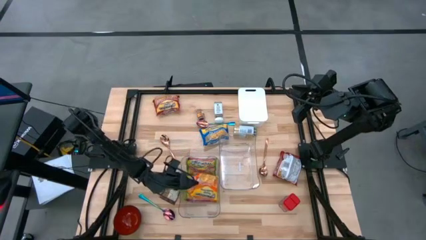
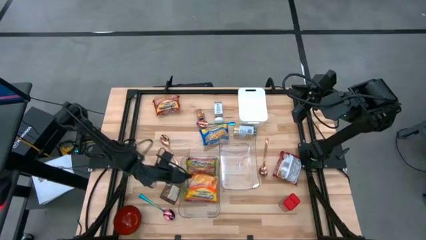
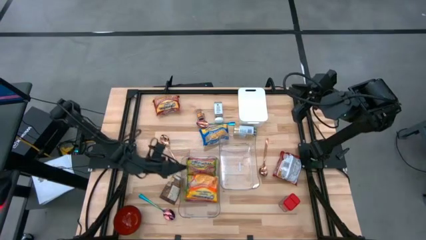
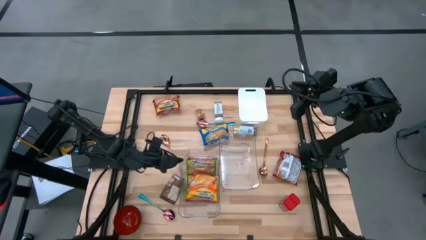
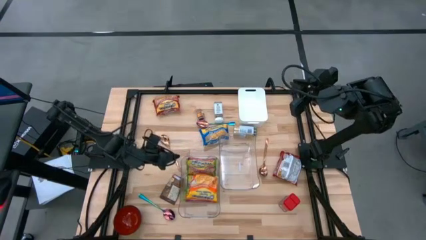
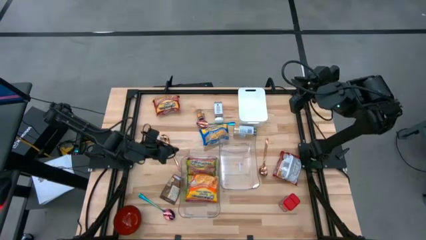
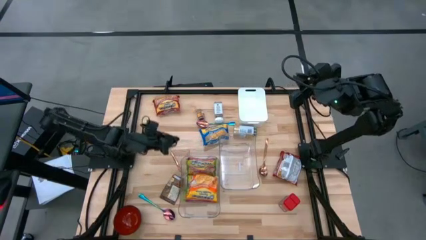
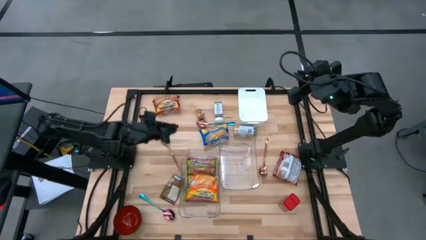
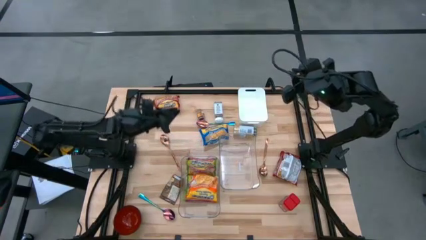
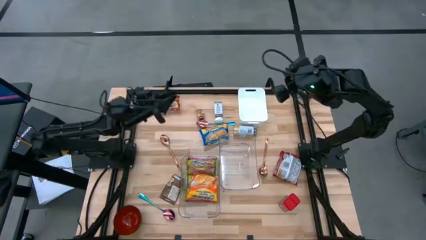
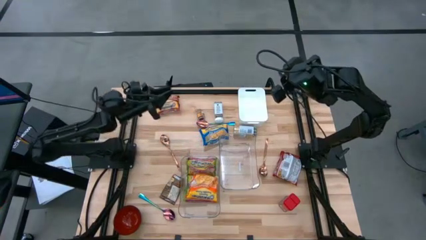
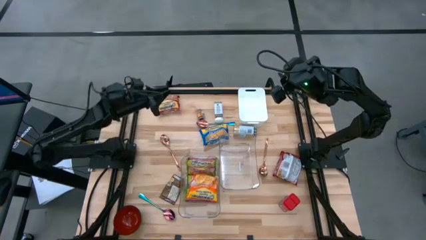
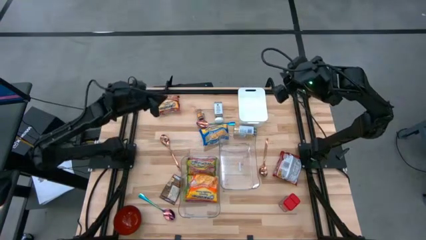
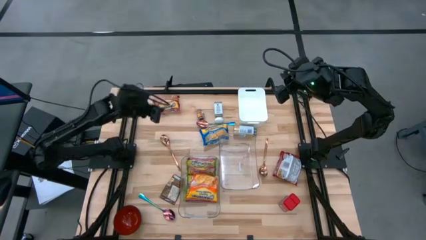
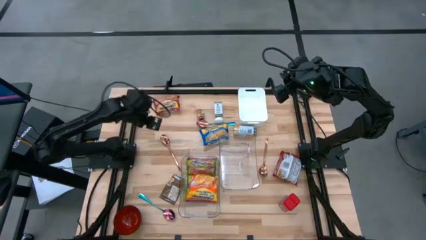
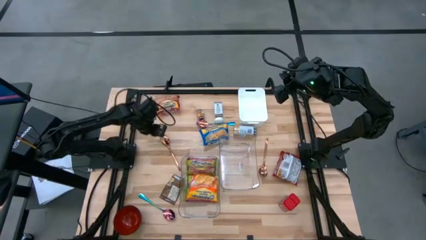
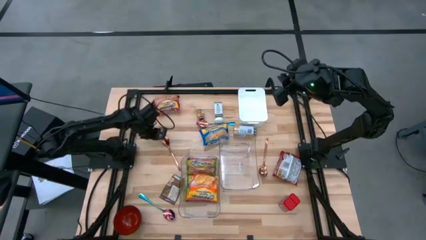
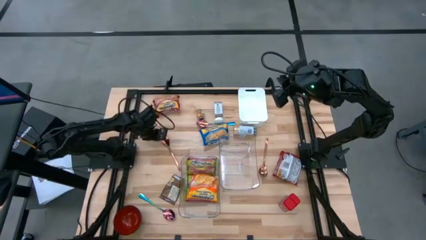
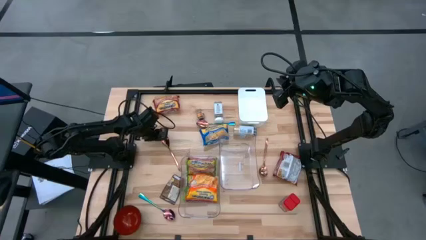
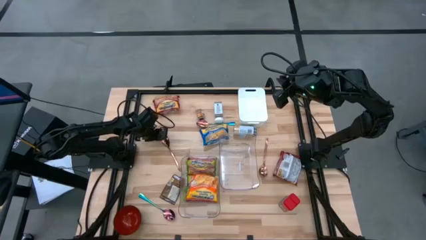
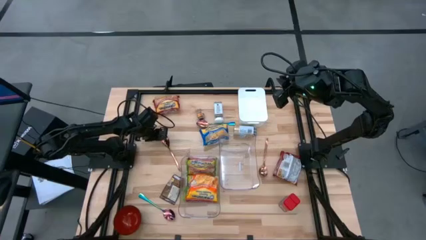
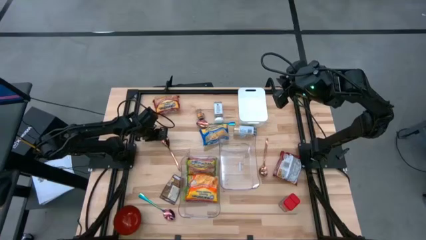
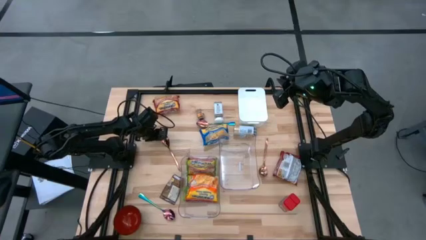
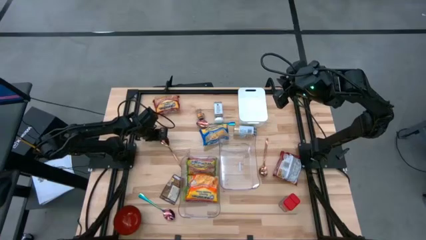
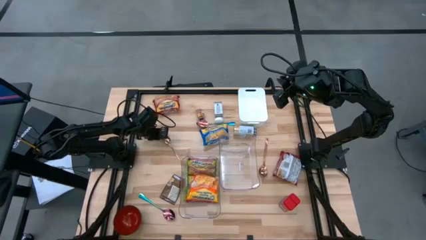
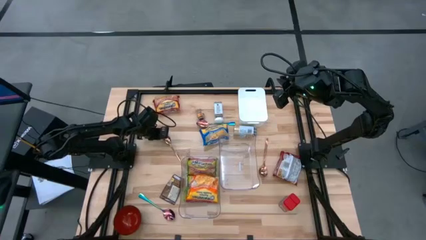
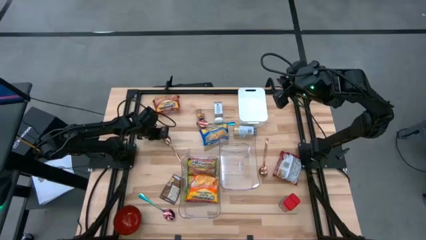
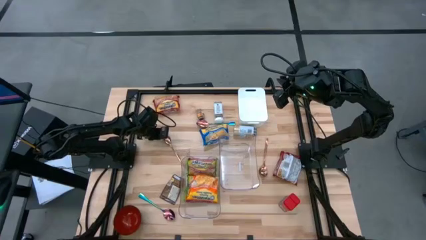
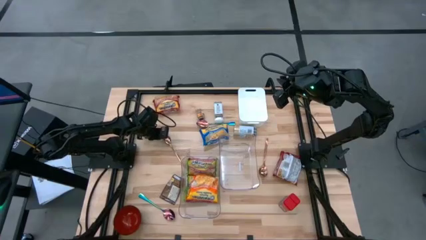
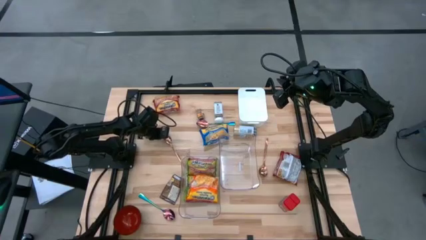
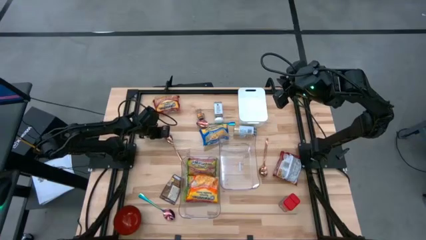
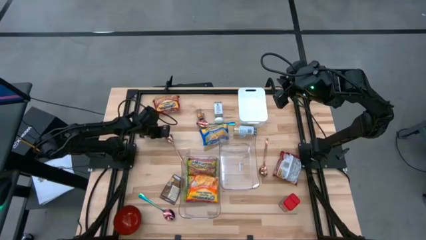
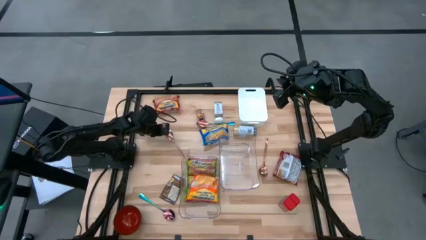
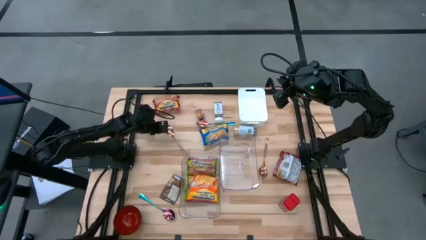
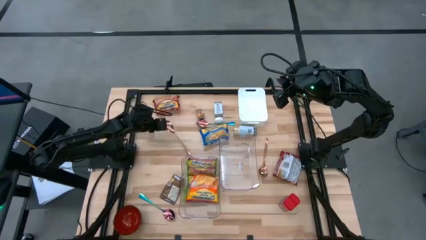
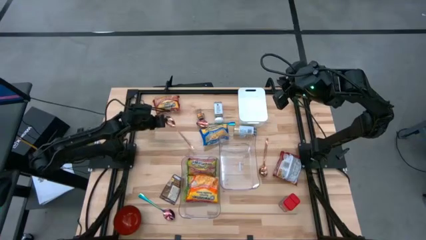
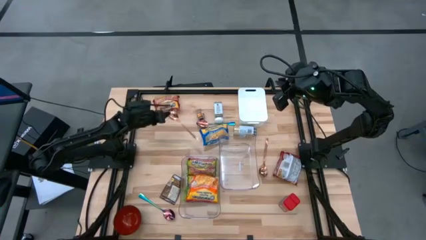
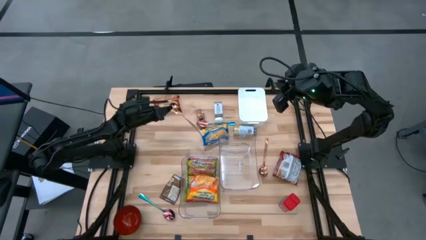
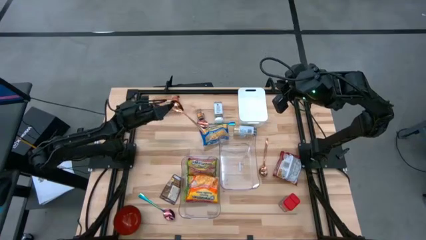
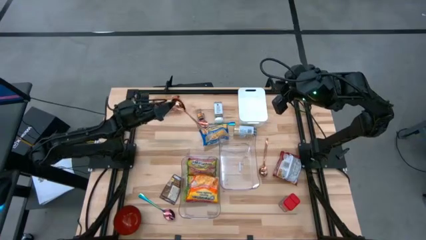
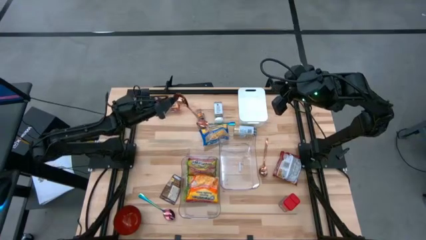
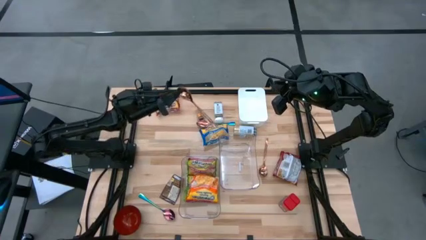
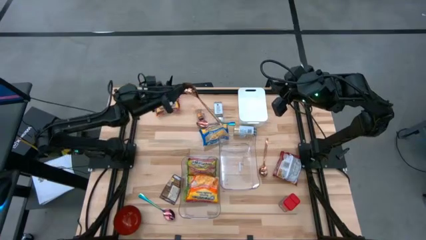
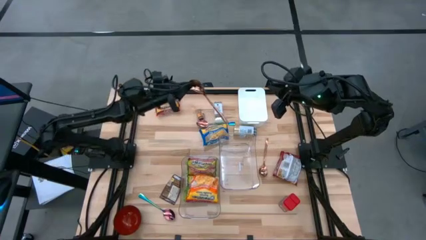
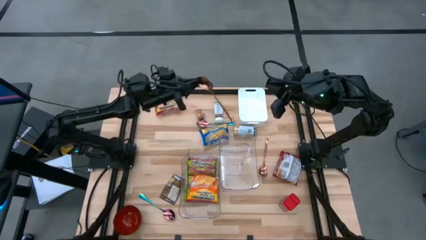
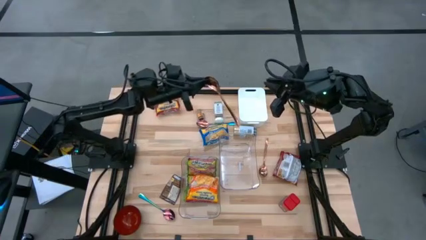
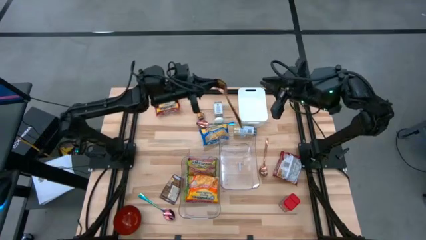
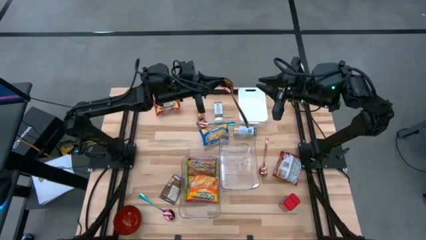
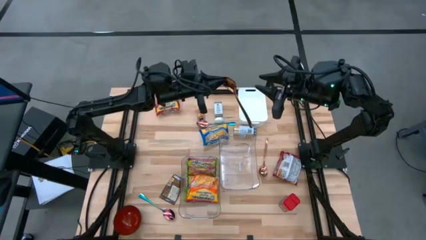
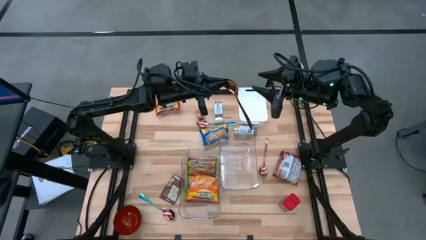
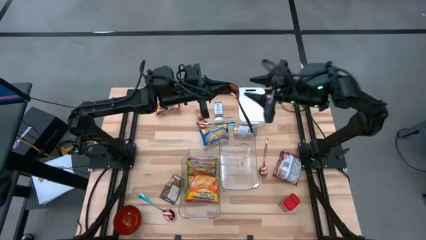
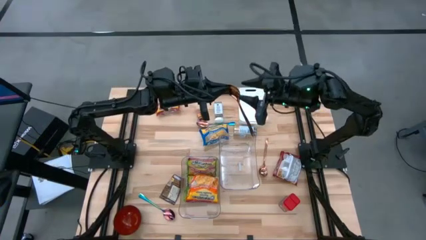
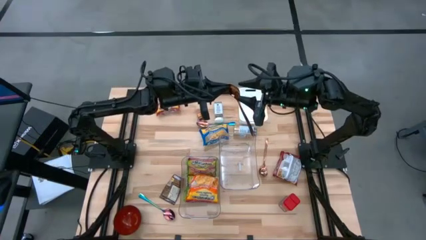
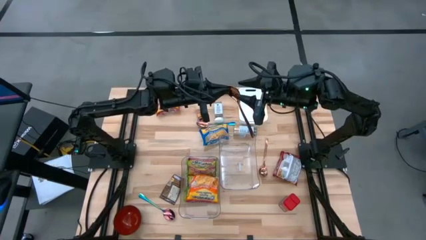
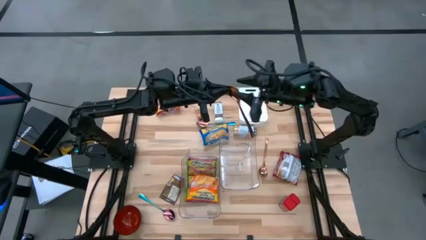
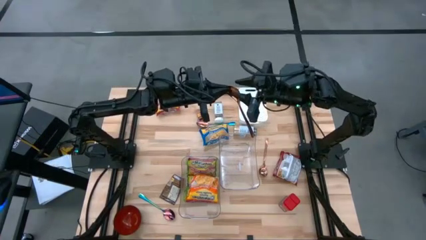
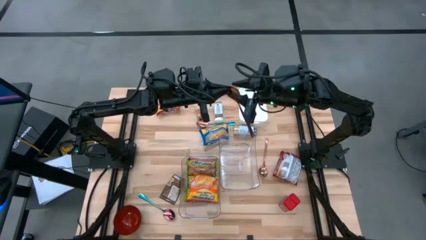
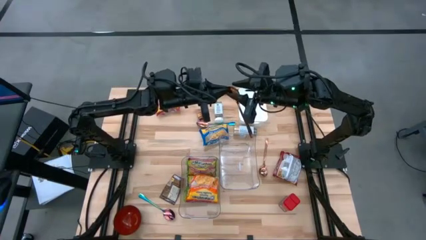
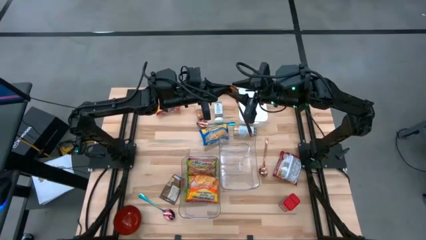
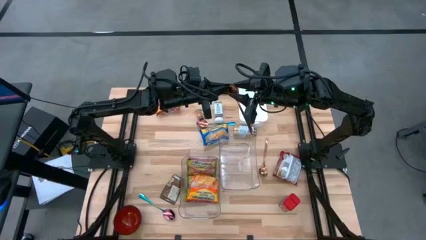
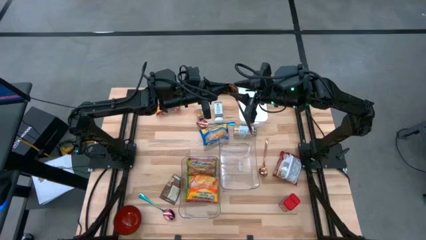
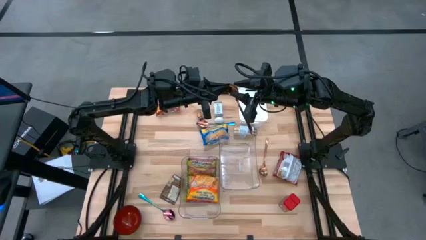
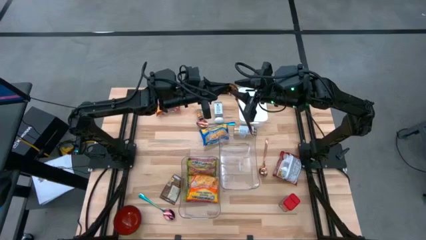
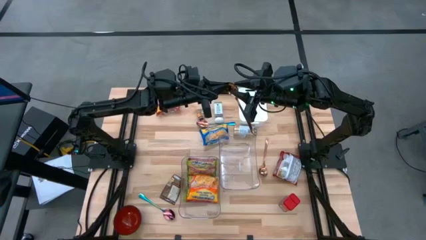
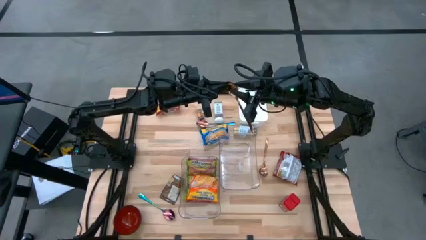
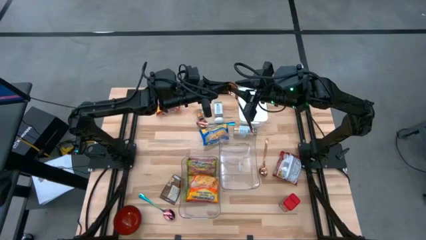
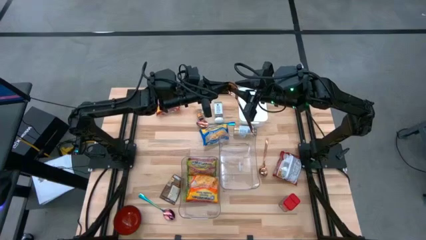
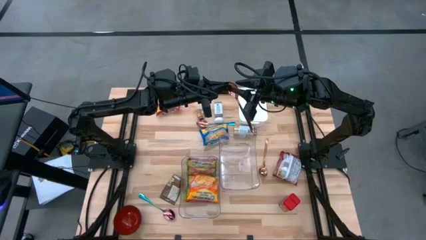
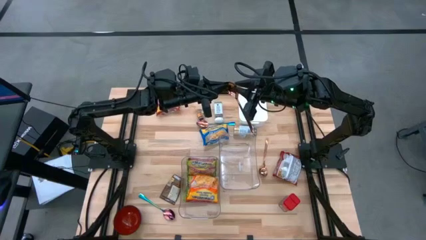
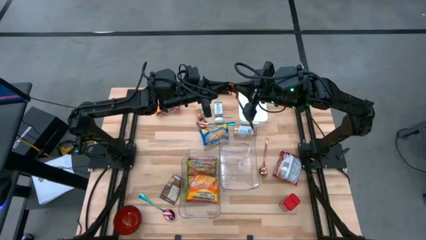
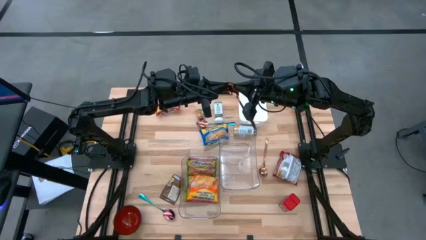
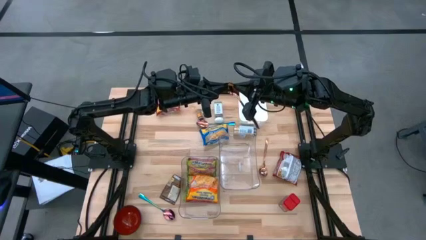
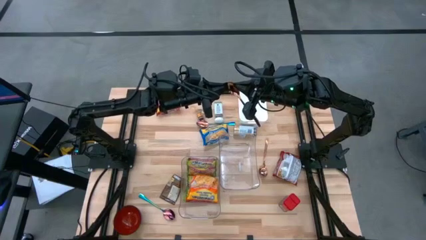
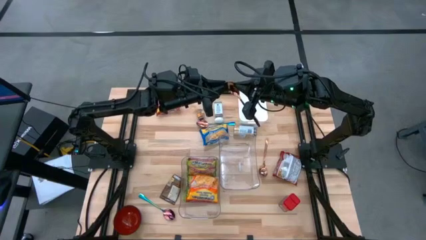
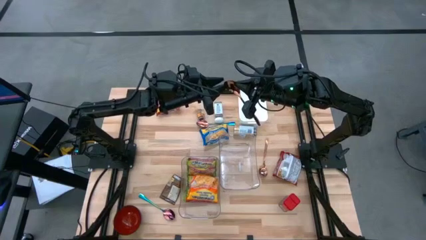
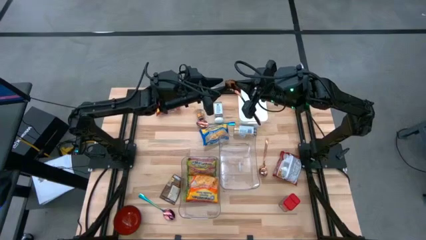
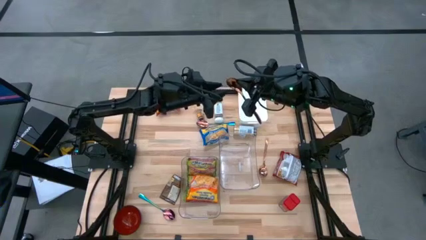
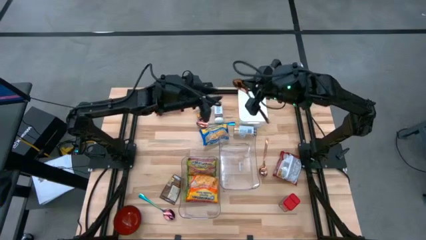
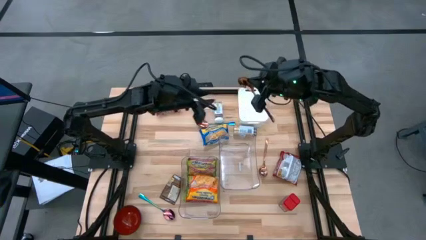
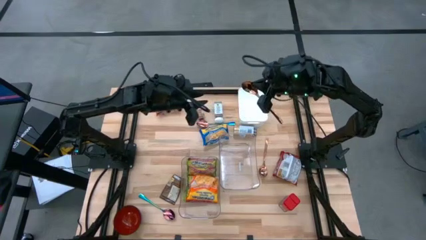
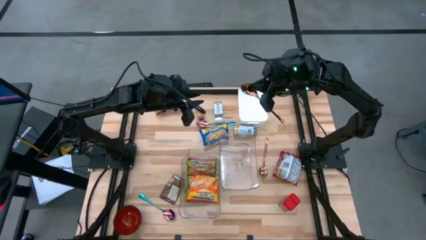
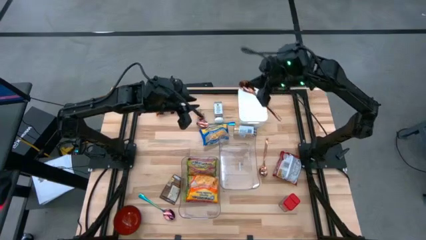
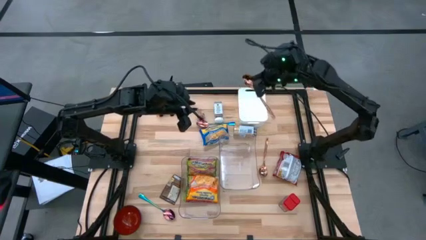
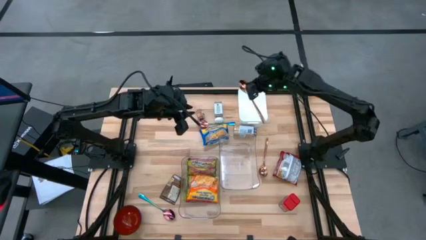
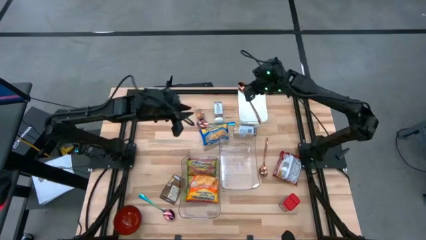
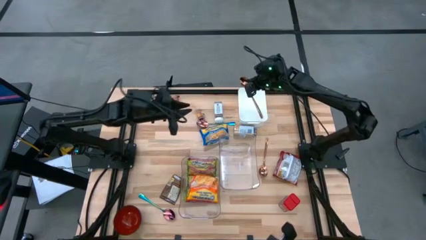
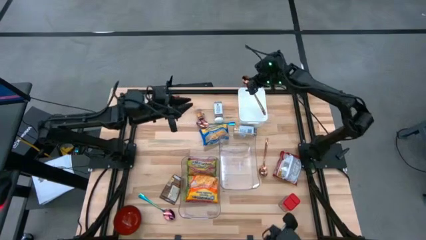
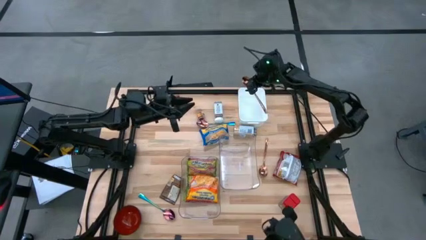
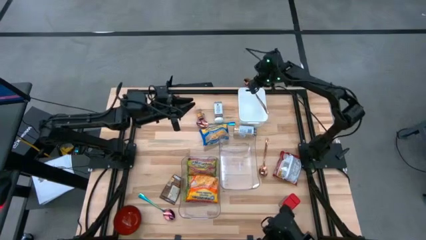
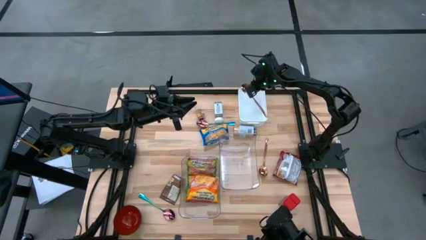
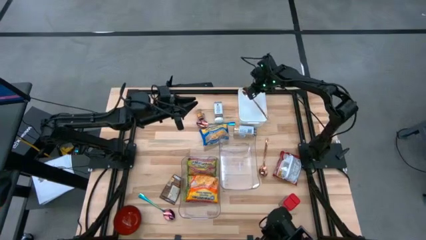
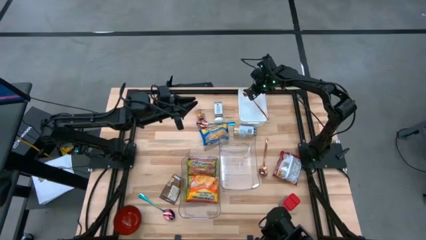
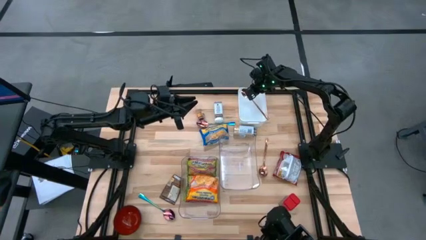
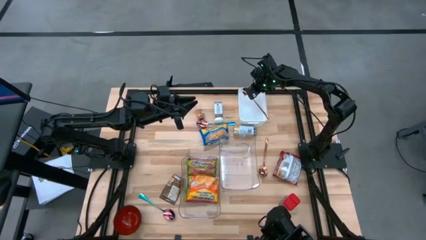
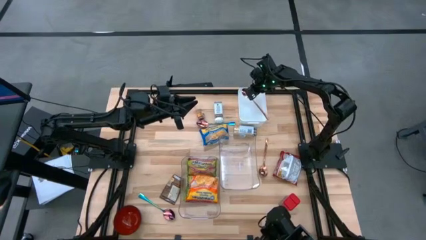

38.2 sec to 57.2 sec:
Task: Pick & Place Food Item
Put the left gold spoon into the white bin
